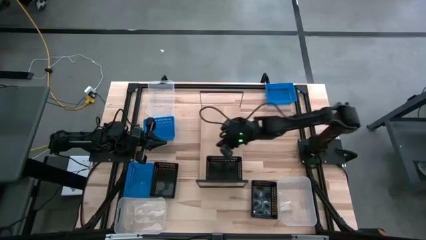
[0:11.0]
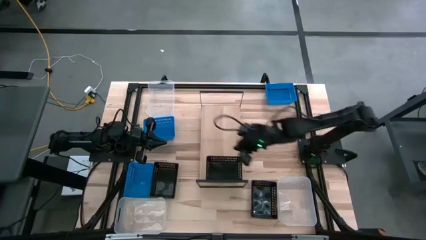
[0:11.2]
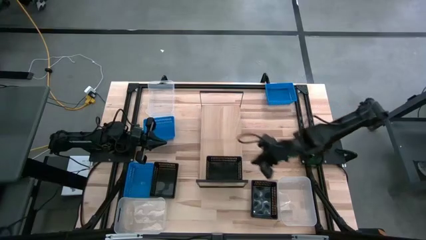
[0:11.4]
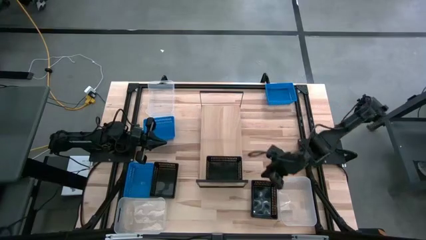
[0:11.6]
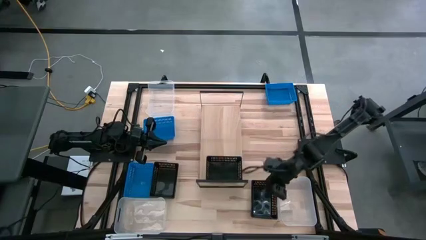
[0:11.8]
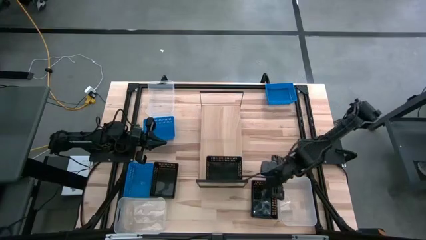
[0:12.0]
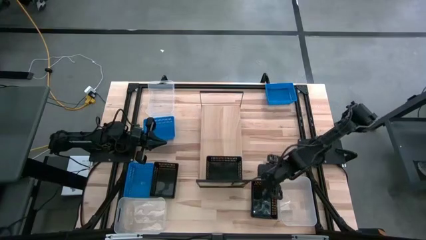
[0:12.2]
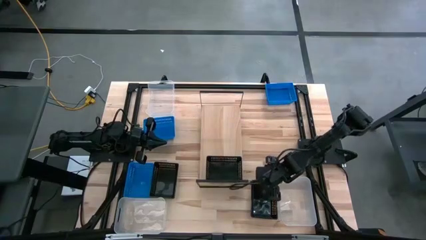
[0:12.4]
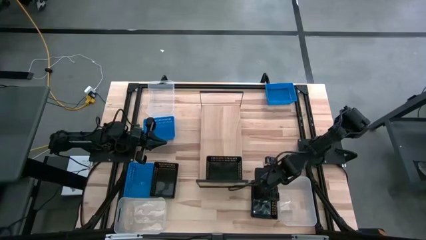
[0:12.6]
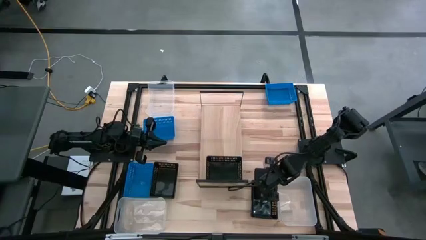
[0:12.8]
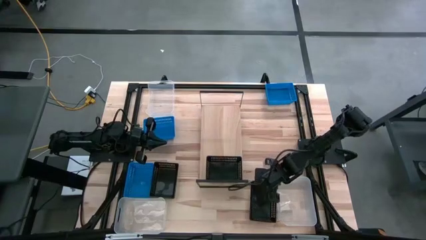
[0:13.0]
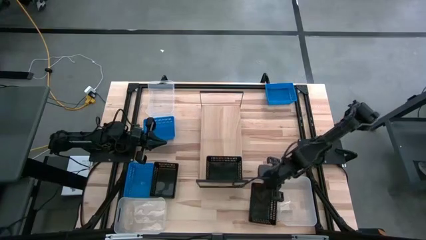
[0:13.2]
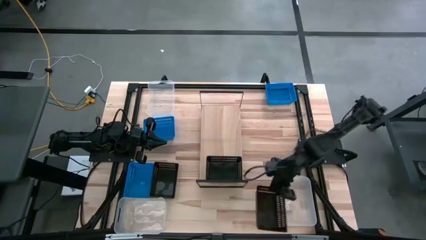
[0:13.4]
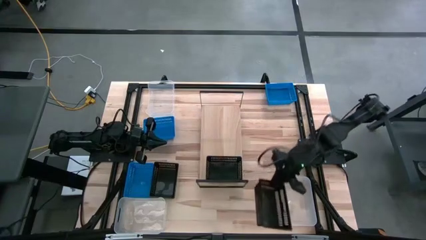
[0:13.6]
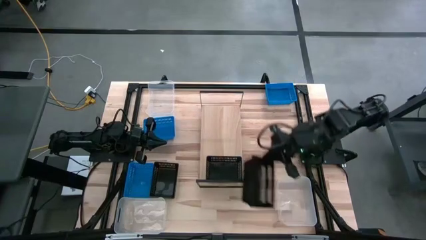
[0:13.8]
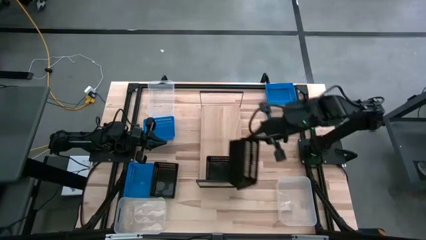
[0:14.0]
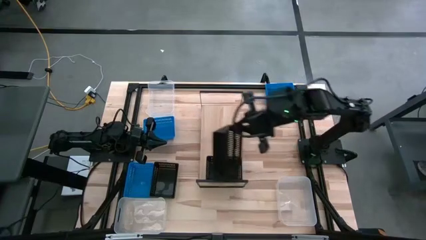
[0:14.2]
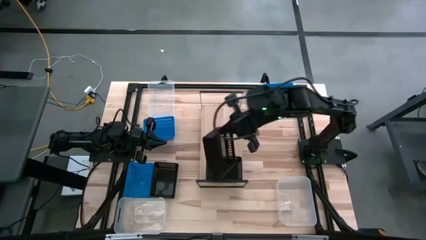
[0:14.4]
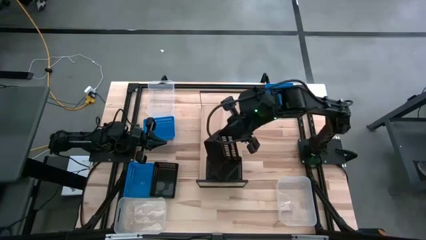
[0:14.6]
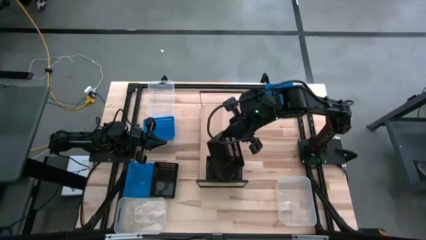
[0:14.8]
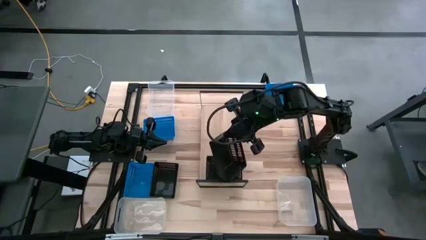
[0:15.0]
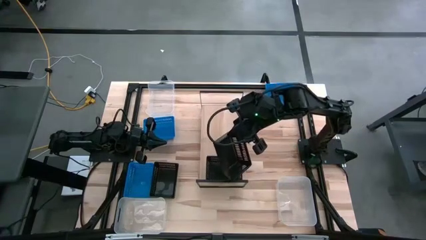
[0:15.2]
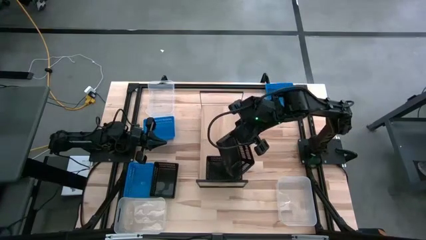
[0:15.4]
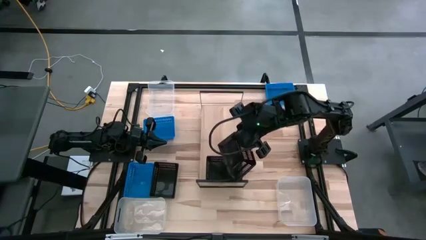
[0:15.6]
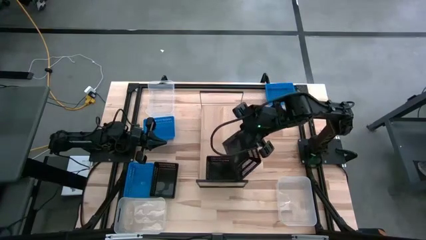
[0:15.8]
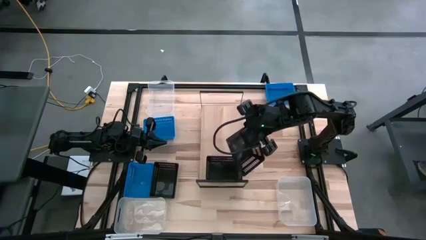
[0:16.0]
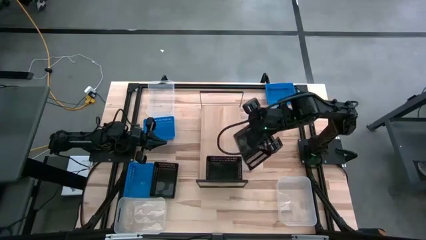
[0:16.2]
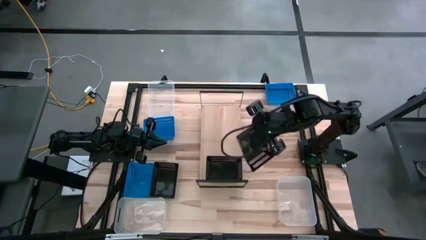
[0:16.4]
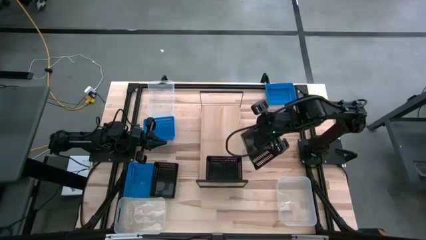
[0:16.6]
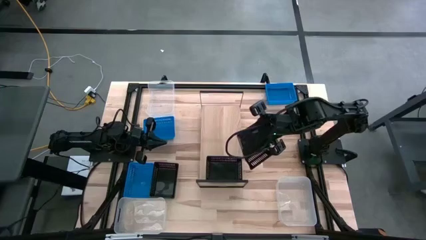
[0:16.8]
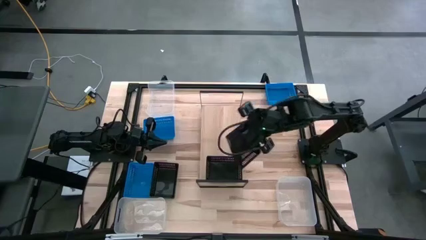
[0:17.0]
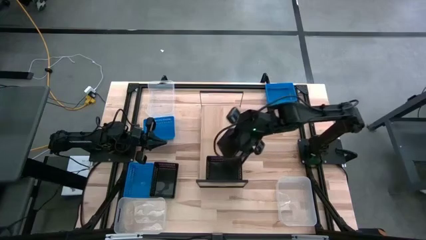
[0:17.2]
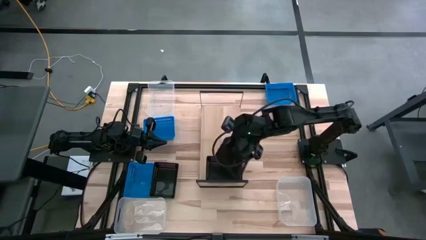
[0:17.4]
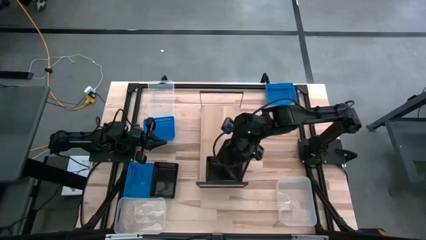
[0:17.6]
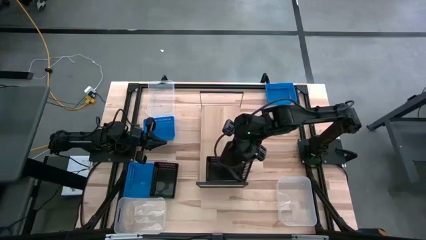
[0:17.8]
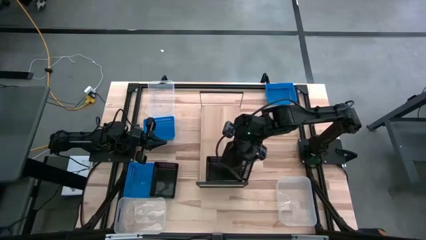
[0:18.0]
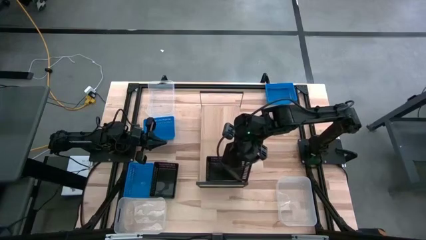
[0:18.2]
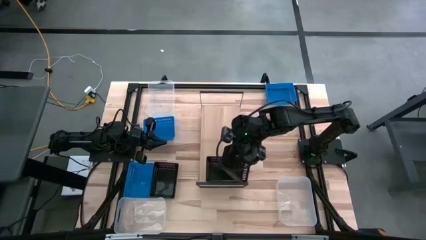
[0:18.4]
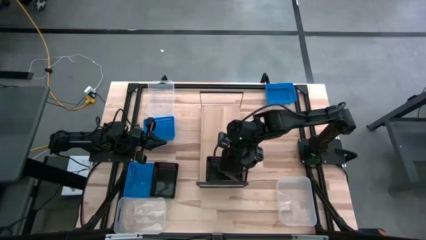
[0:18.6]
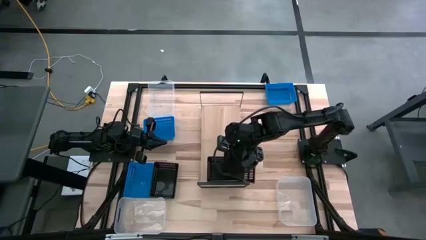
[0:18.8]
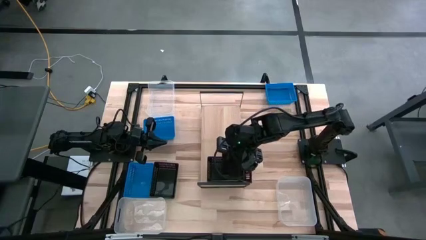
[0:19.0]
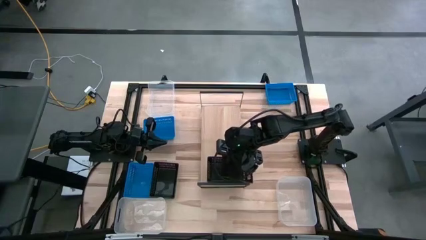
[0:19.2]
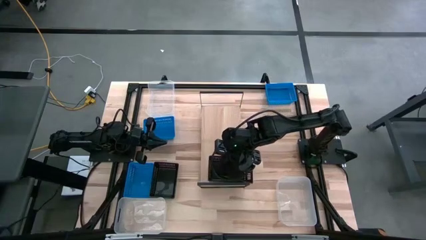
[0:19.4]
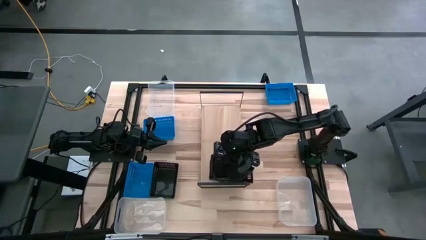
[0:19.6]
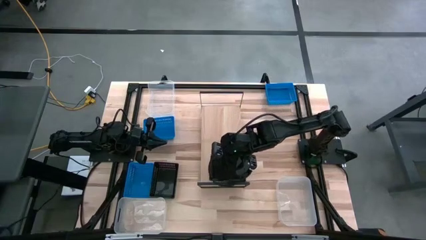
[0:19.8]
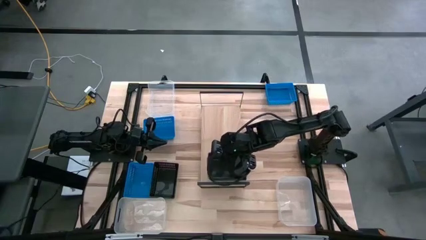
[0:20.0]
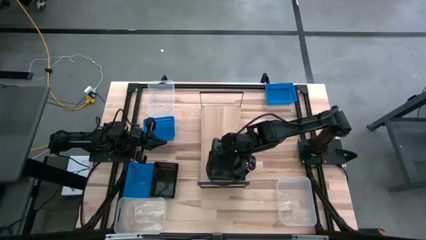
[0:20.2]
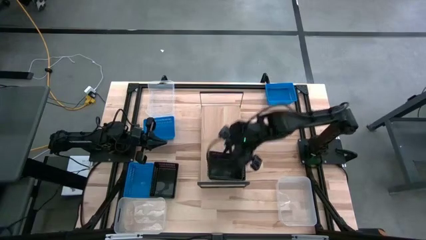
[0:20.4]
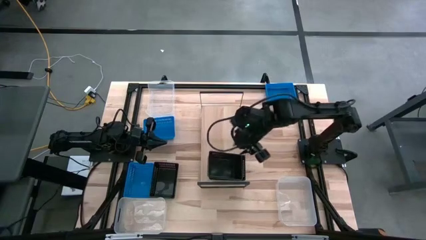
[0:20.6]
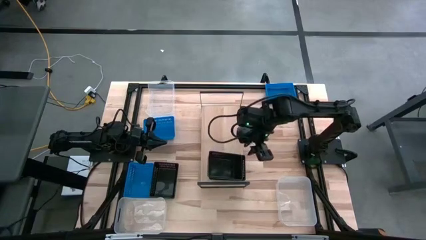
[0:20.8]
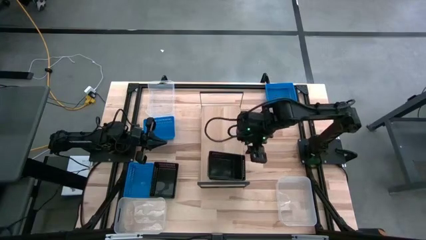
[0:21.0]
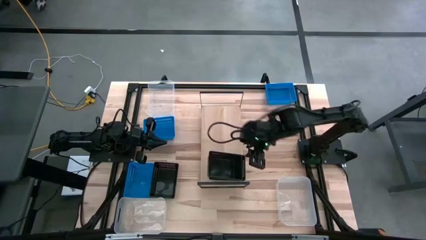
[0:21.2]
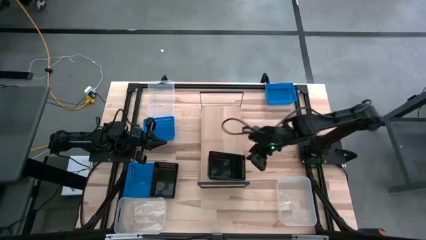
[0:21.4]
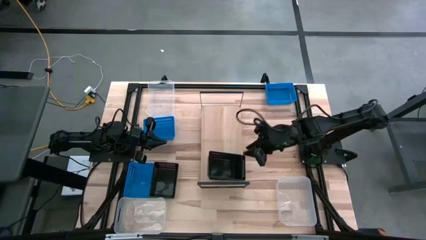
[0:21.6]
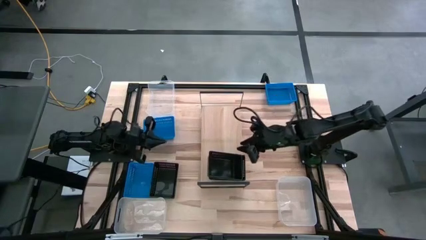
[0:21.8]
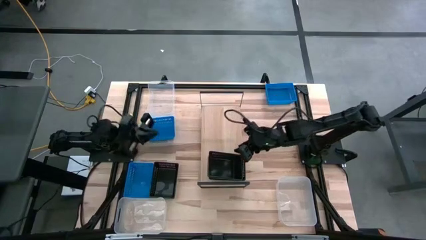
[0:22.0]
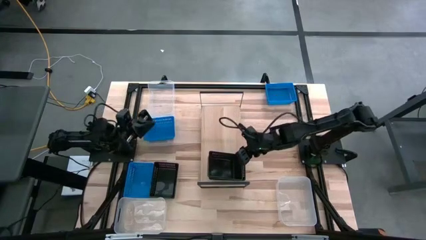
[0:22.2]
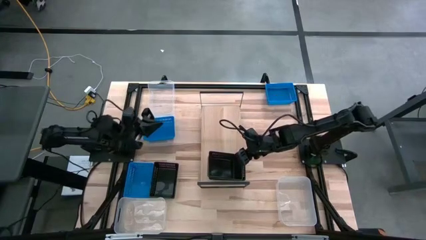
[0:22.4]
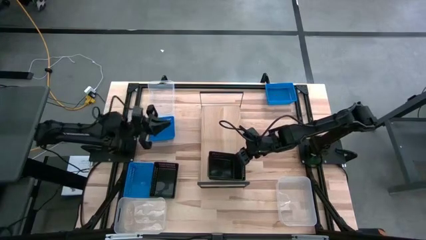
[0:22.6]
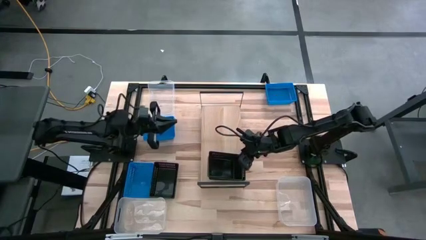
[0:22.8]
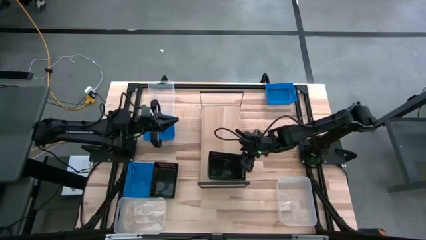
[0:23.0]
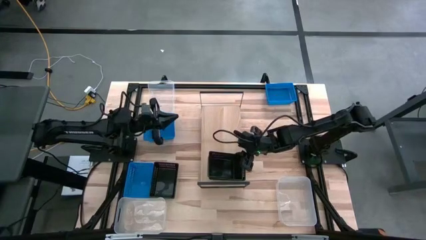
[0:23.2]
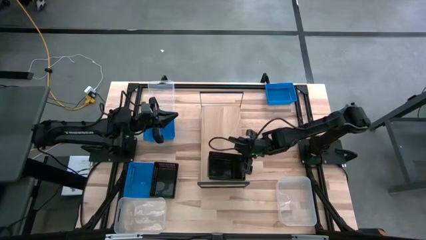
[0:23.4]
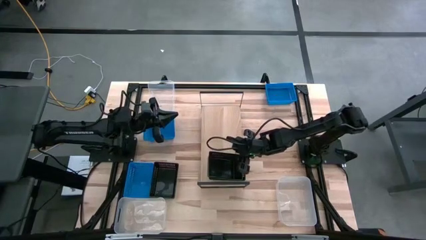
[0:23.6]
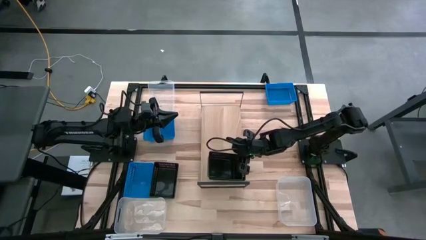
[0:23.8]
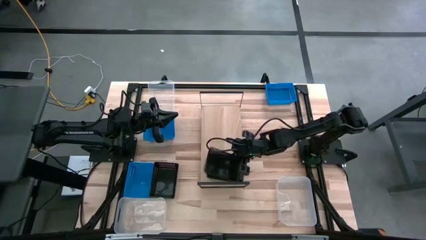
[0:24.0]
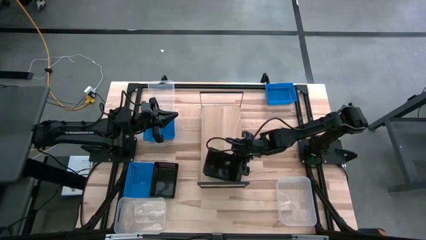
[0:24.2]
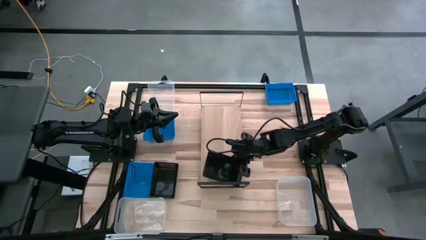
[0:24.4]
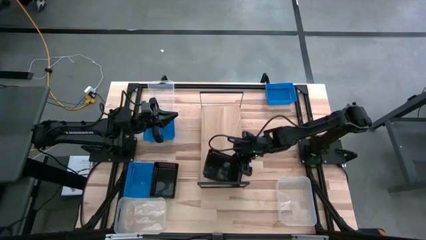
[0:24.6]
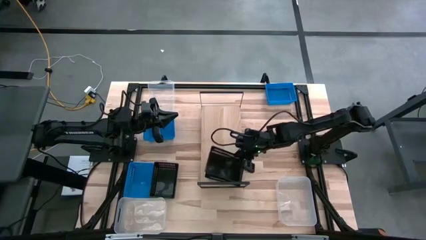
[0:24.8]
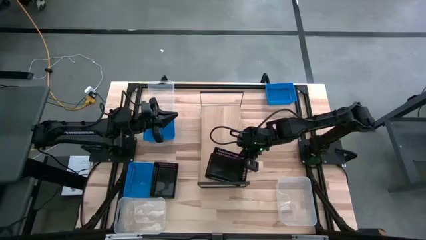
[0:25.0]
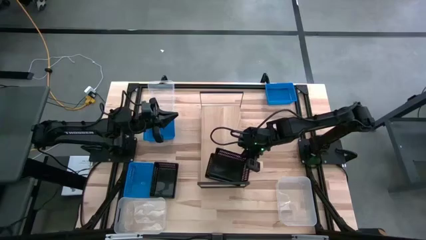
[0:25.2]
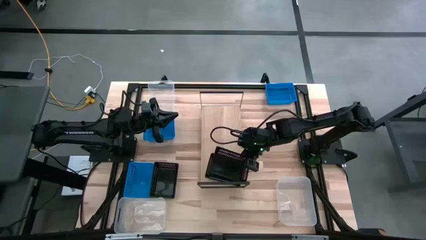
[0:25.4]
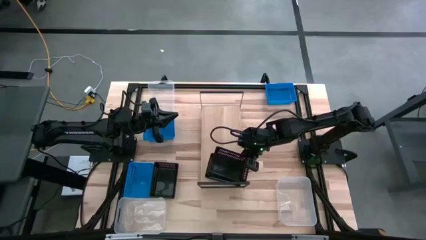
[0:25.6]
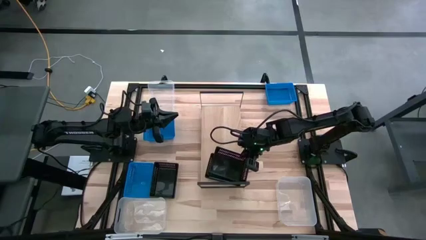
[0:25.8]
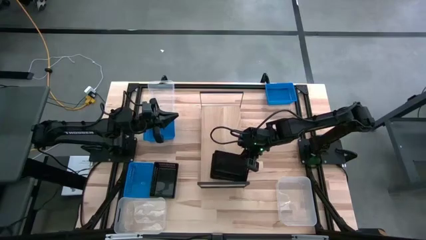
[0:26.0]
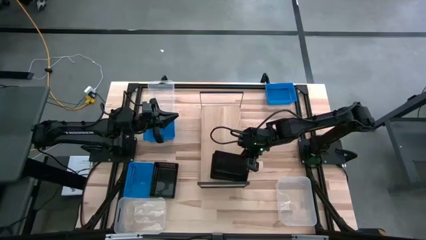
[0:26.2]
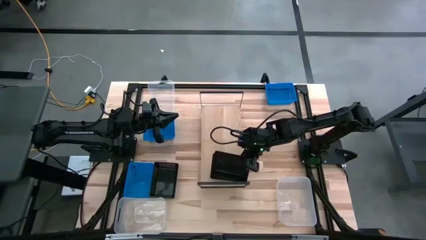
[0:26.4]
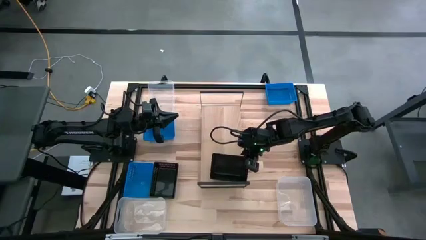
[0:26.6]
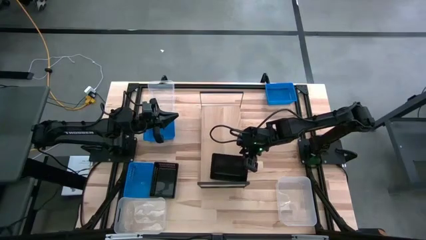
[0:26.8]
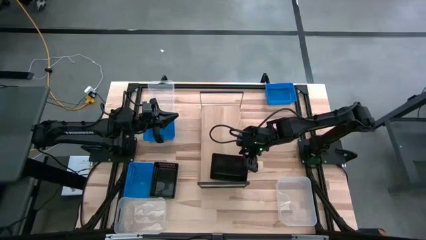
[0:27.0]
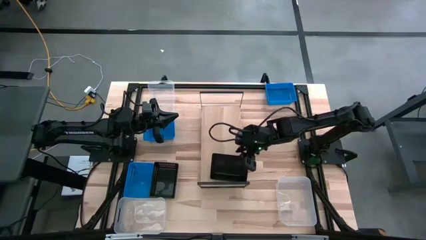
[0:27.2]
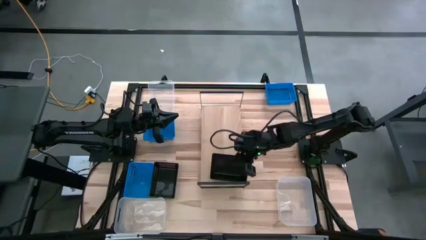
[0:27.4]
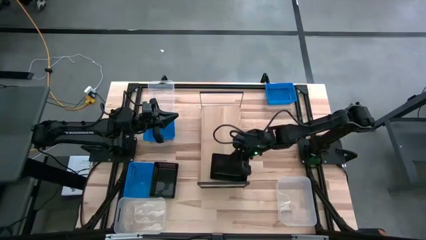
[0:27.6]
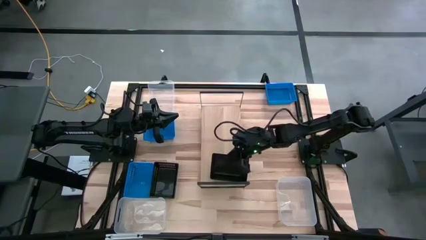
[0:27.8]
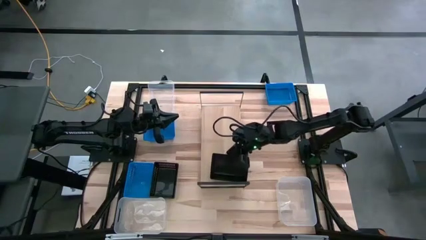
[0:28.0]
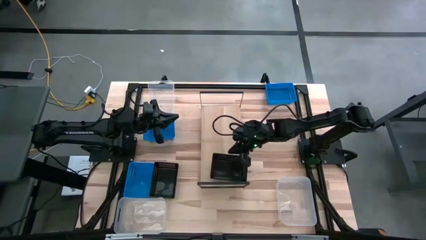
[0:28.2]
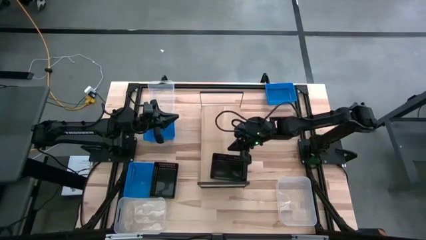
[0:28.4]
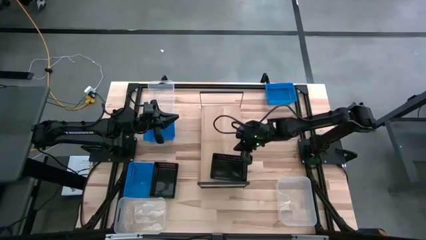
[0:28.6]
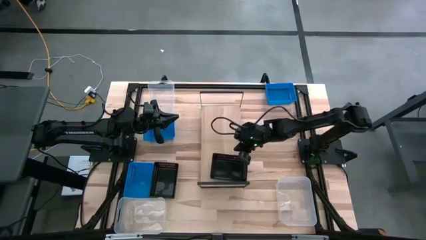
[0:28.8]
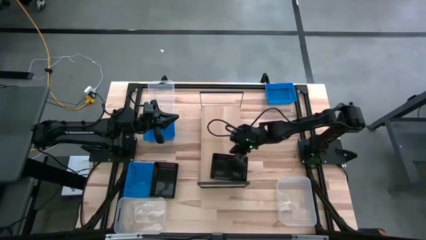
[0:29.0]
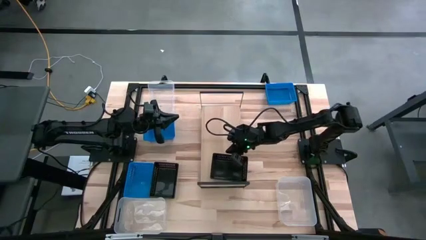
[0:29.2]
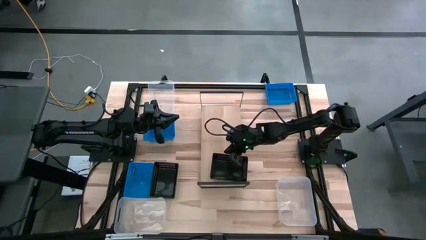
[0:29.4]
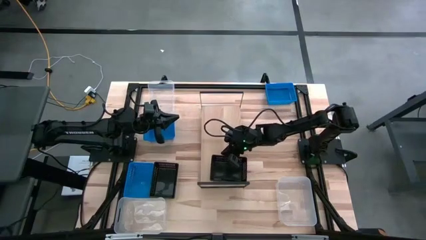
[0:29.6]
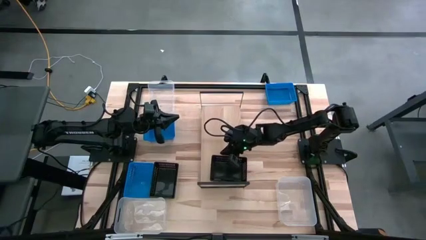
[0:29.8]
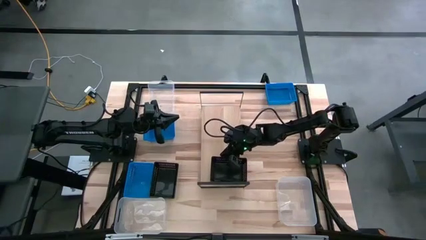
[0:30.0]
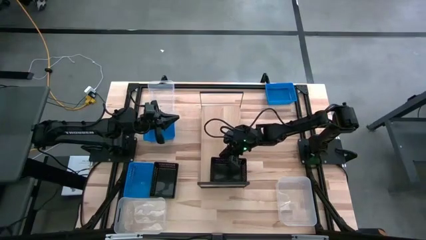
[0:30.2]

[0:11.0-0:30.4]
Task: Stack baskets on shelf by color
Stack the right black bin on top of the other black bin on the shelf
